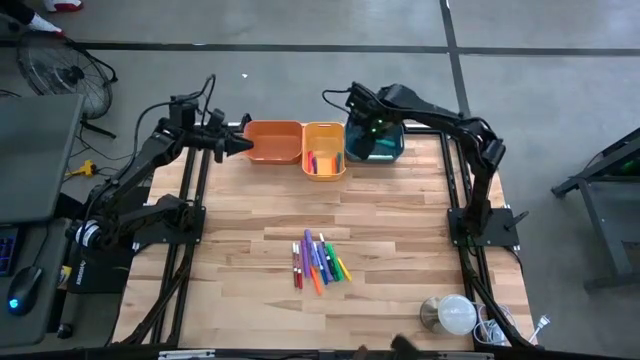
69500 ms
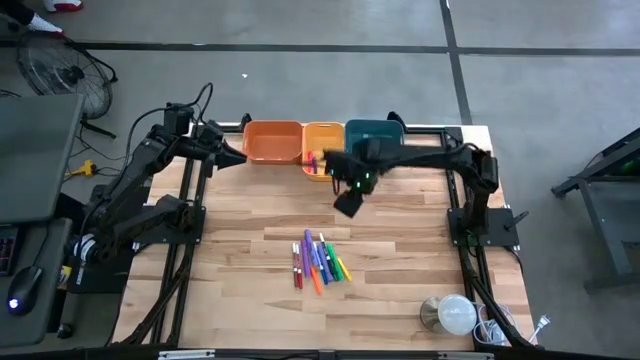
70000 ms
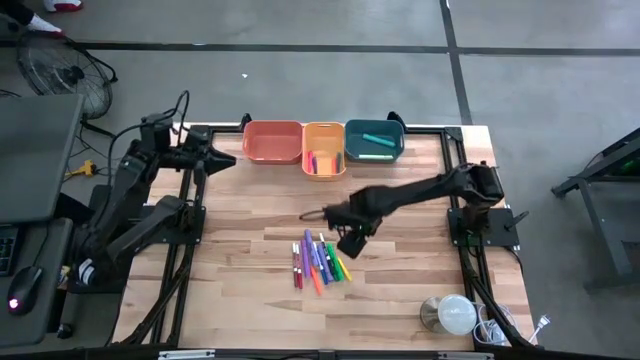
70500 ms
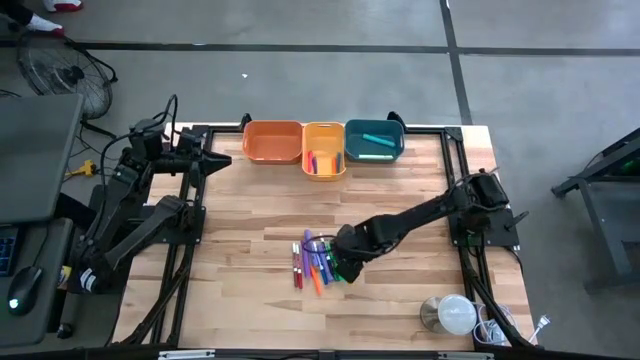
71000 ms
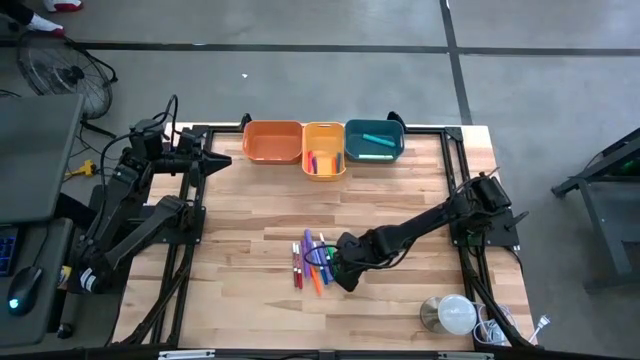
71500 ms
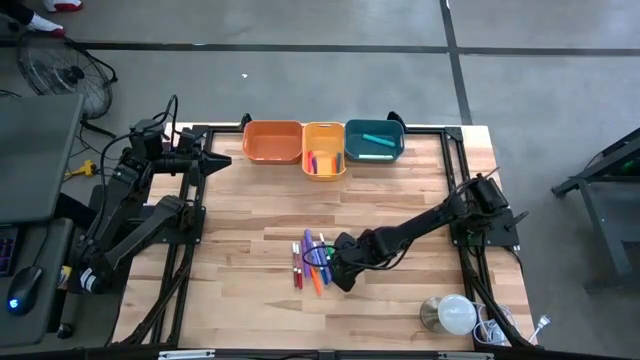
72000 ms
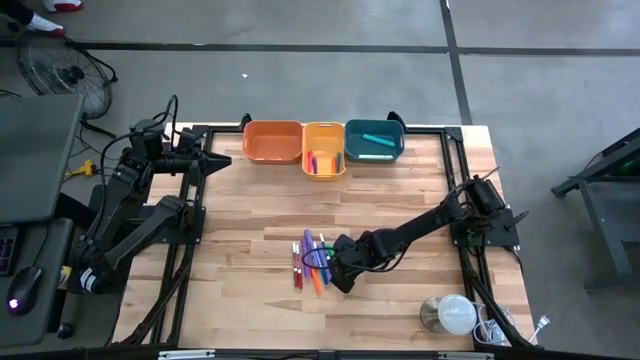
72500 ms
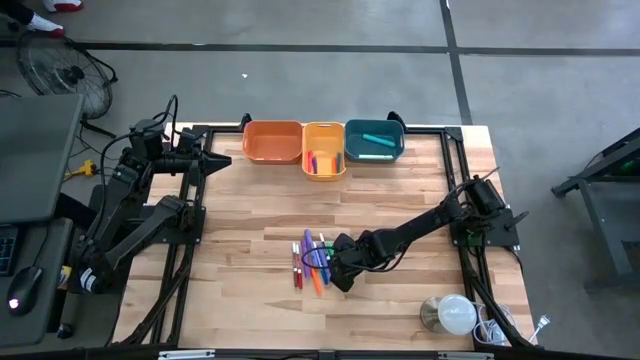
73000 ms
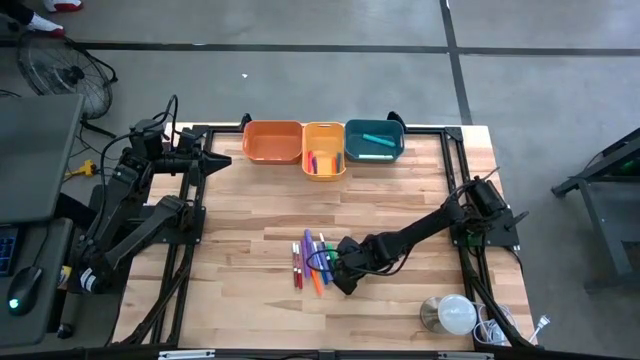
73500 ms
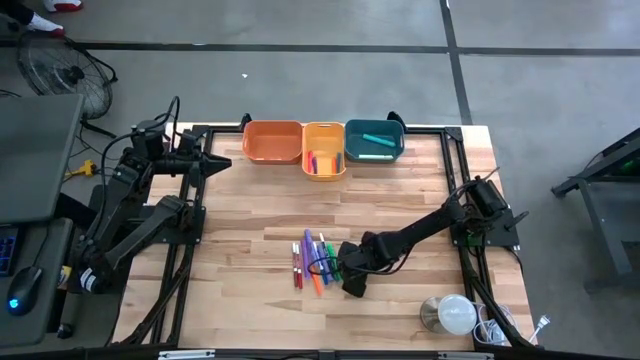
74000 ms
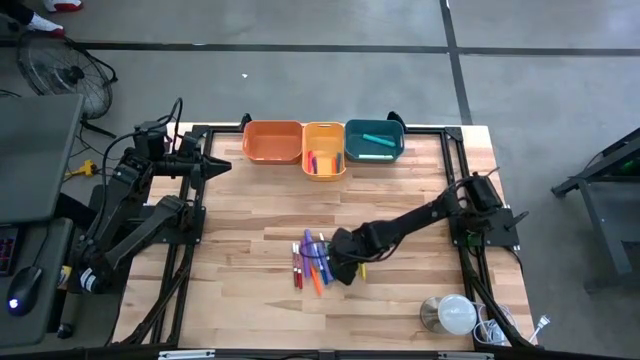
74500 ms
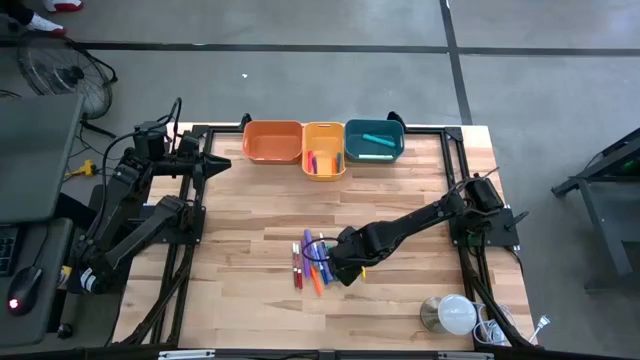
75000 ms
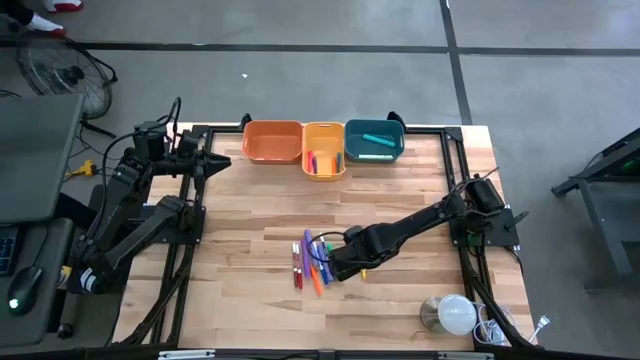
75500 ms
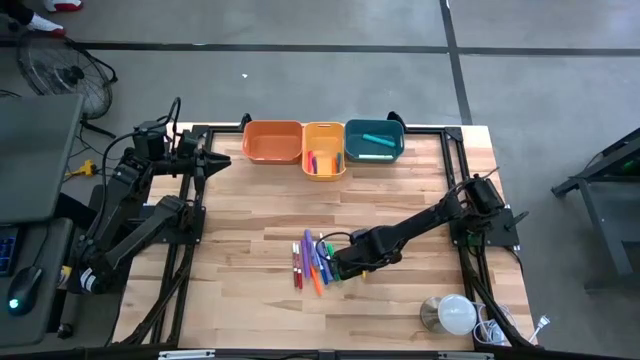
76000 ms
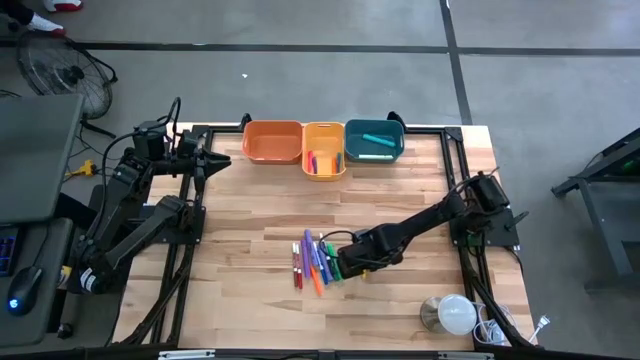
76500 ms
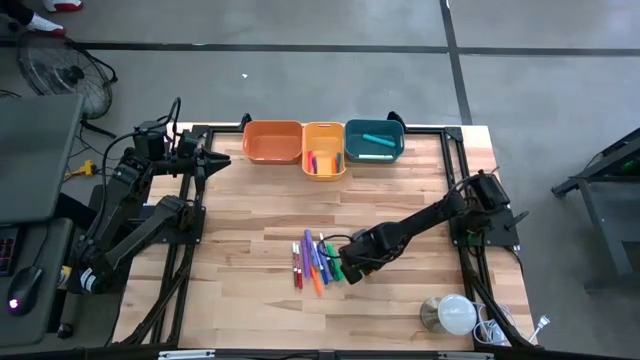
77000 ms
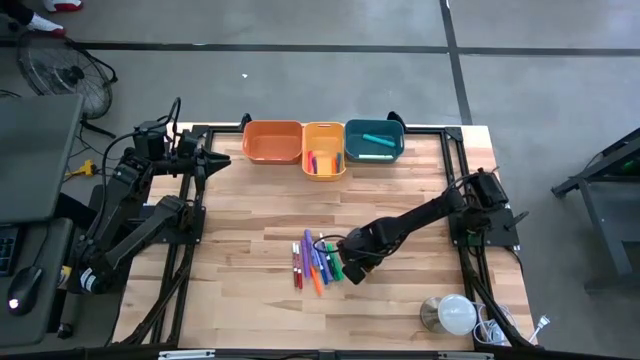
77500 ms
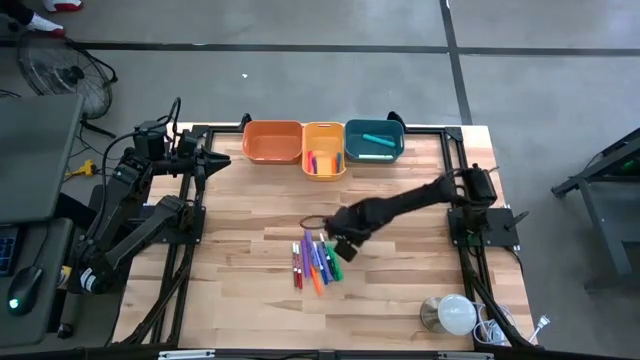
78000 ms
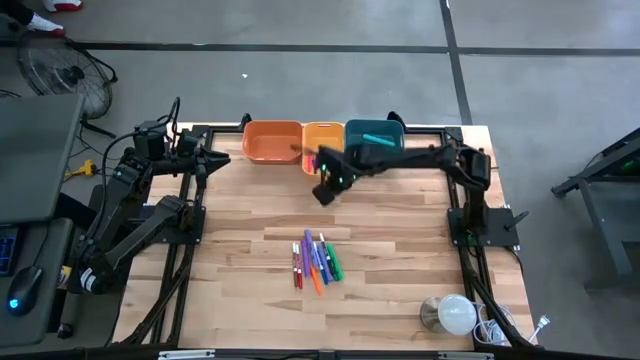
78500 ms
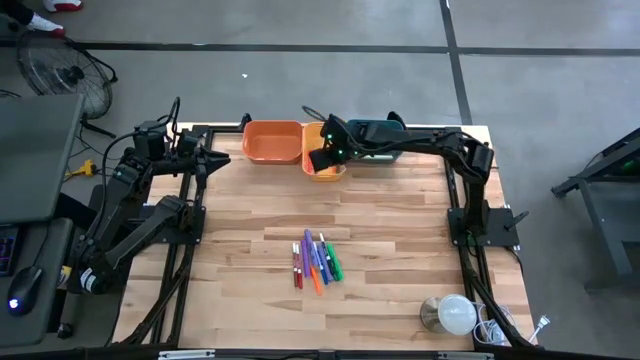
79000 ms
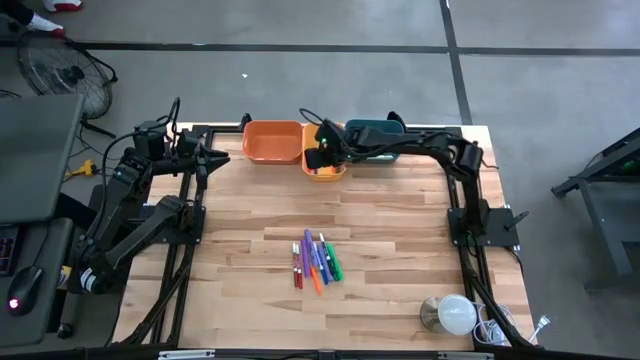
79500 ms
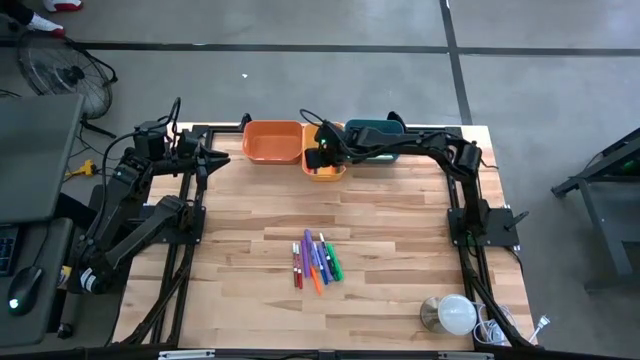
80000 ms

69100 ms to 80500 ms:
Task: Pick & Place Markers
Put the yellow pen into the yellow bin

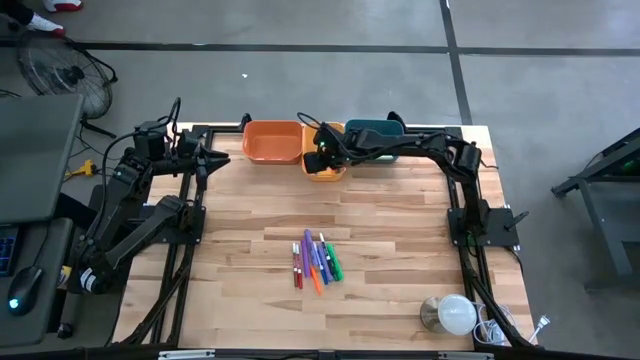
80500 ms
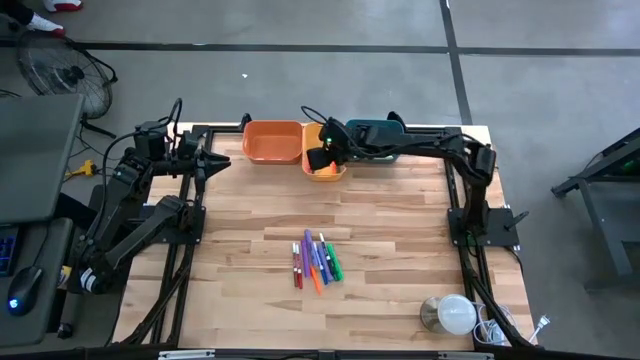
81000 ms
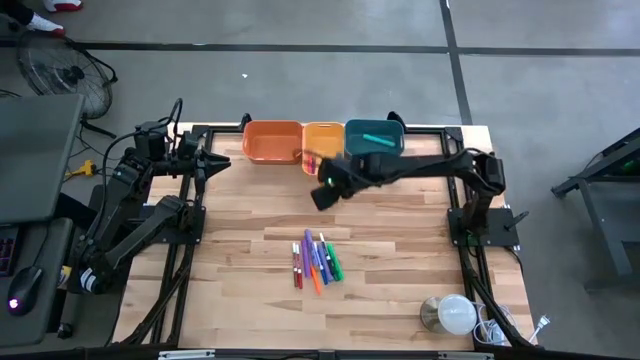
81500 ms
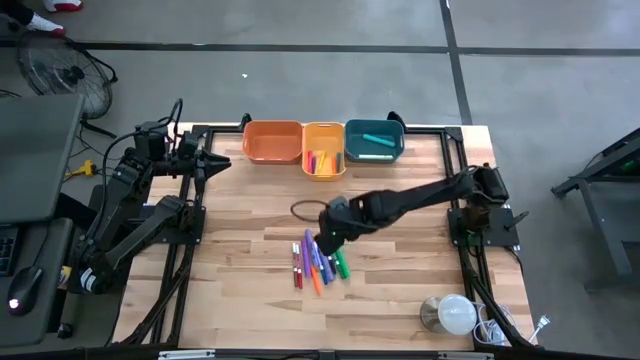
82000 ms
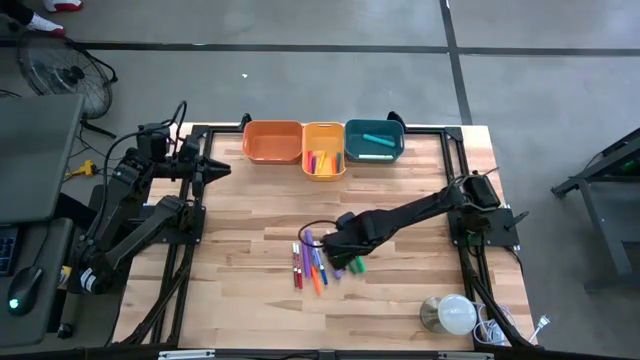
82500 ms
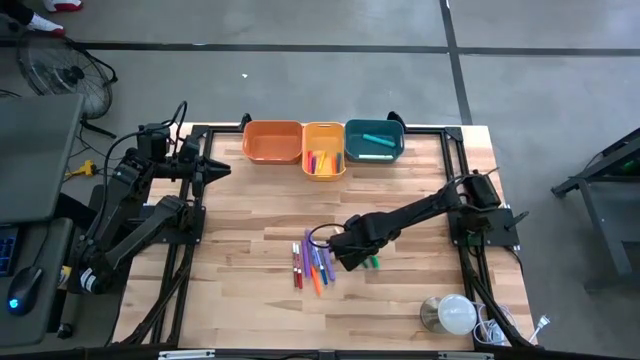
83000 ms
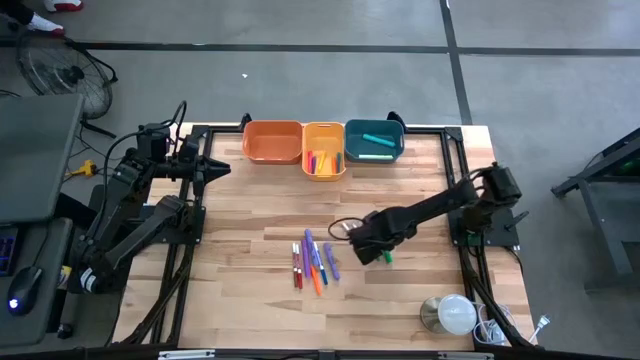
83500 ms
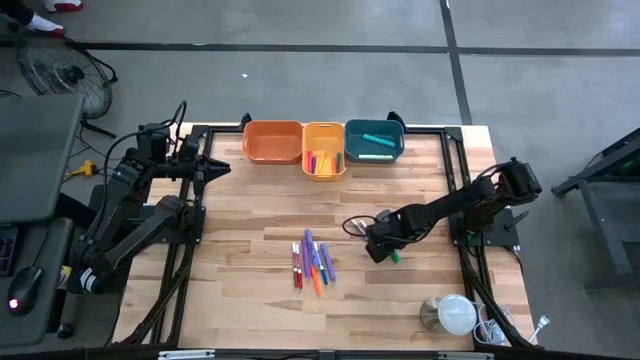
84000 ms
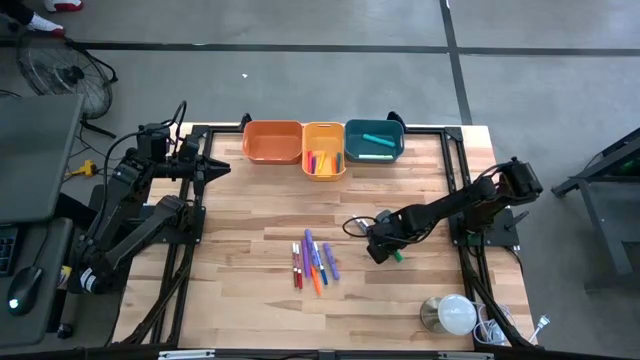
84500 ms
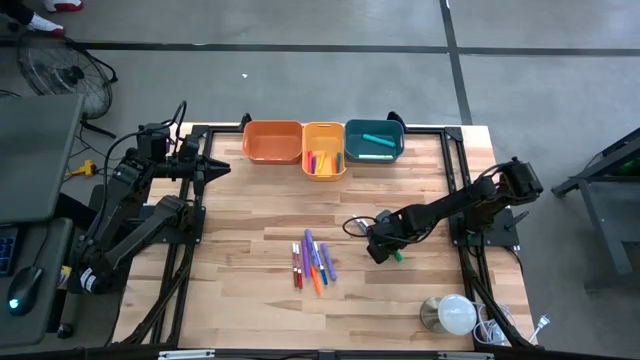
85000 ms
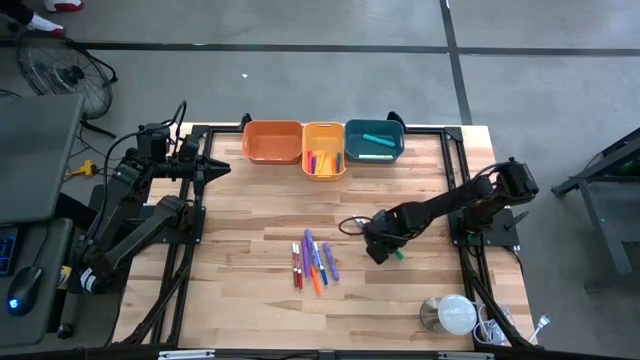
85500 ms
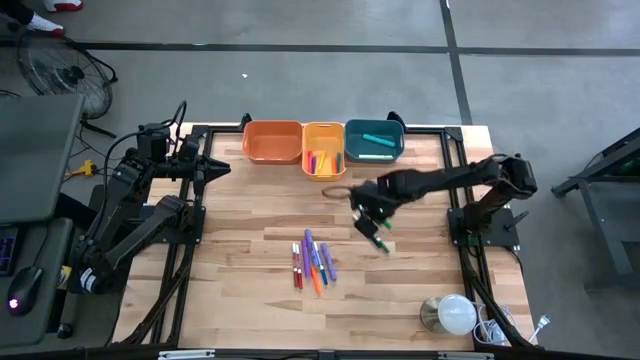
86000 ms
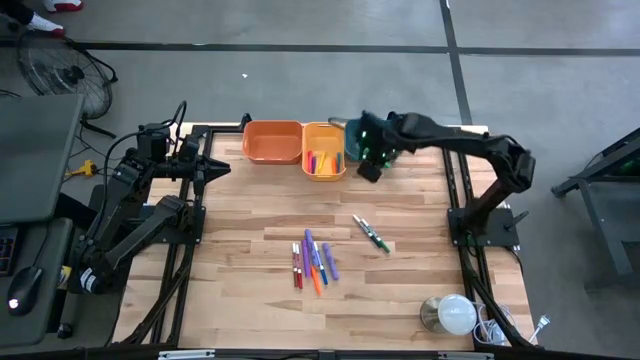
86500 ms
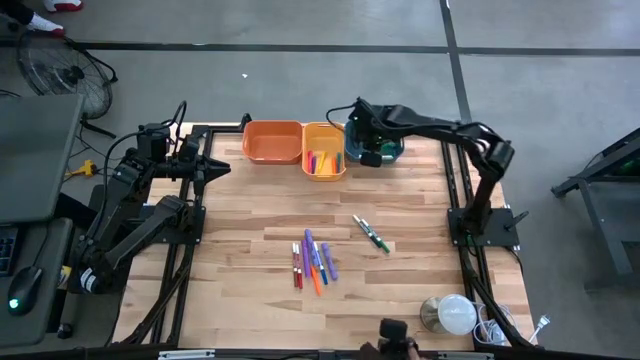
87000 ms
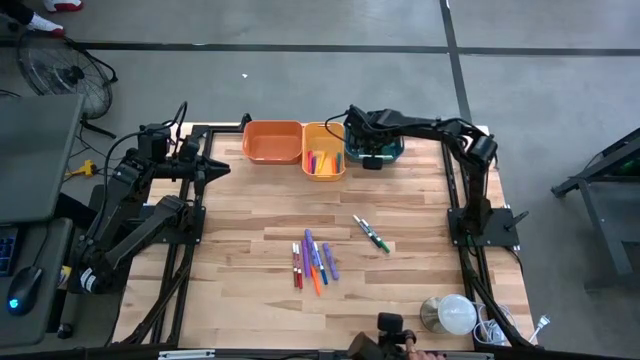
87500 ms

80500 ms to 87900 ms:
Put the green highlighter into the blue bin
